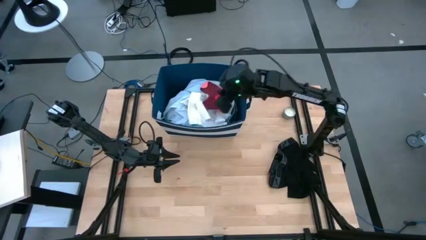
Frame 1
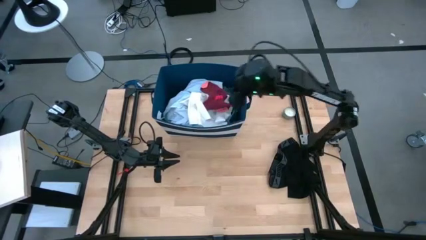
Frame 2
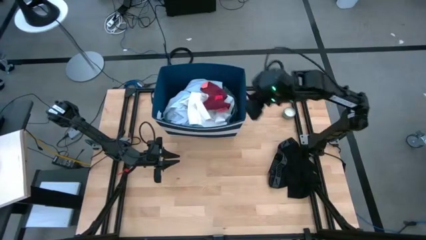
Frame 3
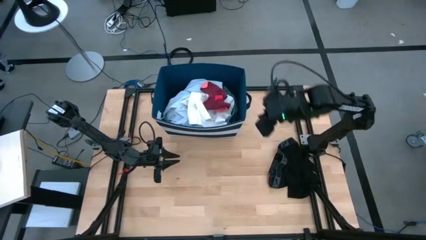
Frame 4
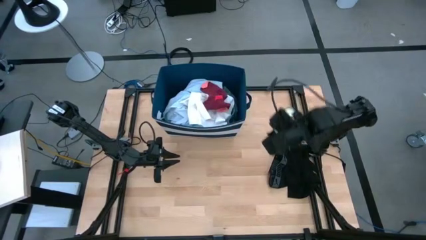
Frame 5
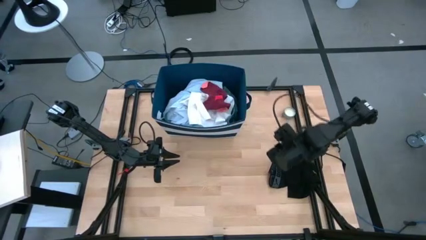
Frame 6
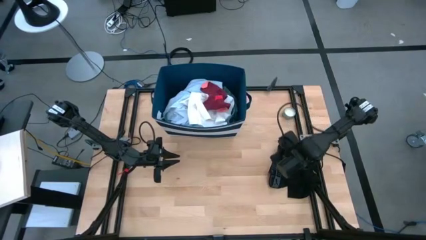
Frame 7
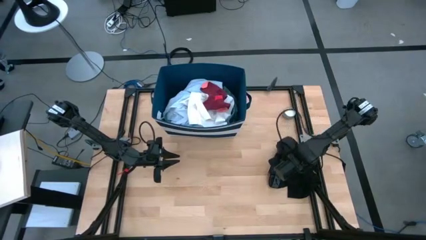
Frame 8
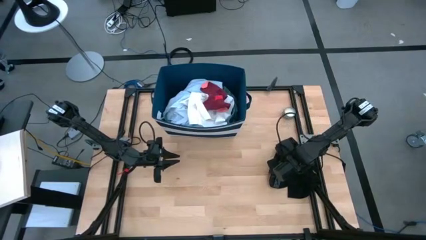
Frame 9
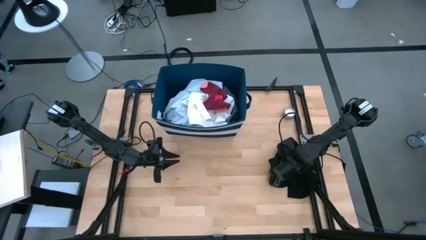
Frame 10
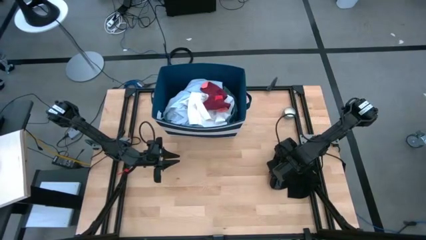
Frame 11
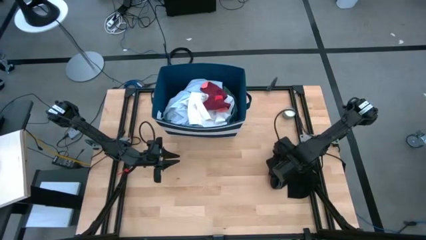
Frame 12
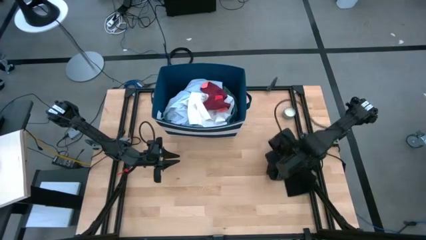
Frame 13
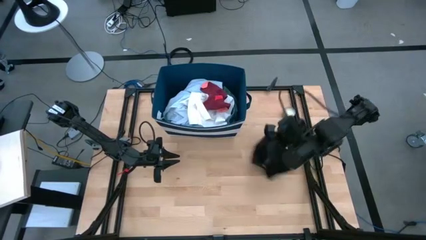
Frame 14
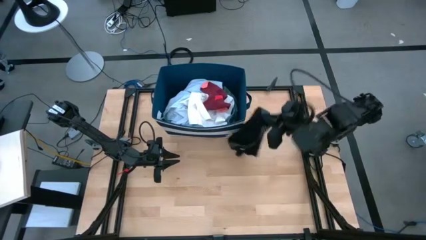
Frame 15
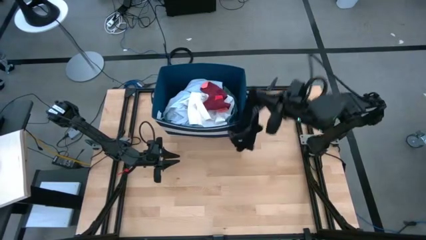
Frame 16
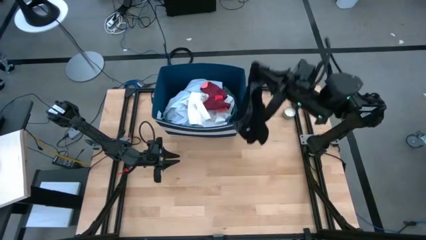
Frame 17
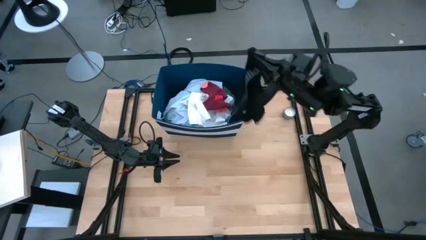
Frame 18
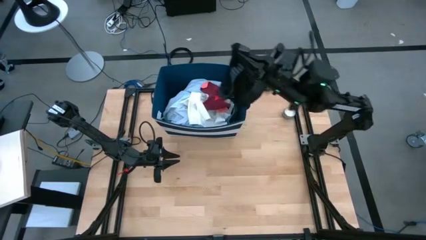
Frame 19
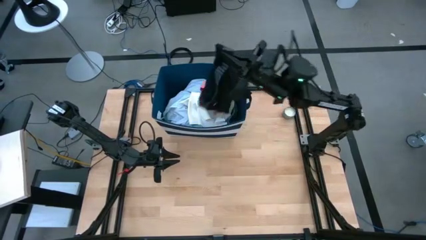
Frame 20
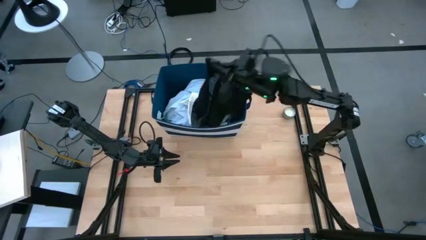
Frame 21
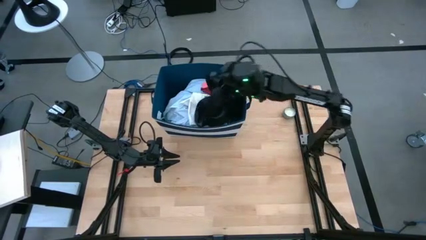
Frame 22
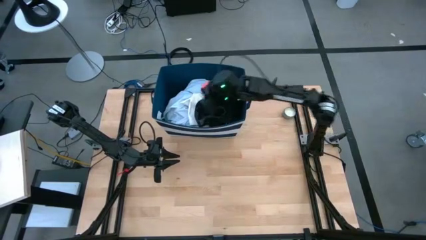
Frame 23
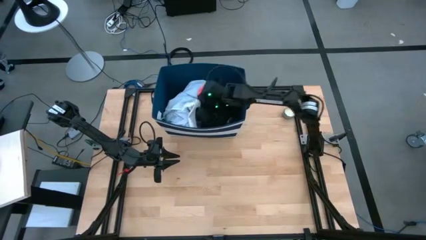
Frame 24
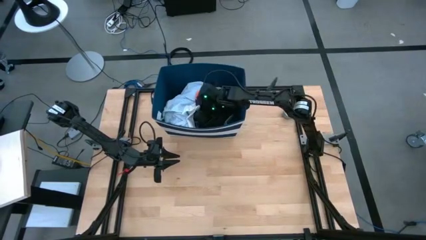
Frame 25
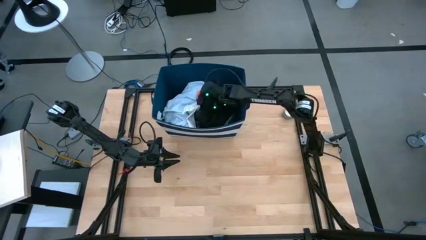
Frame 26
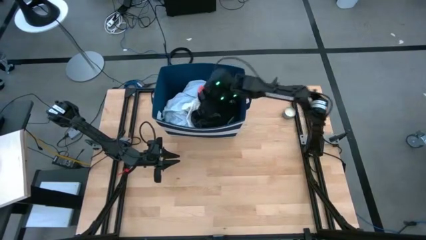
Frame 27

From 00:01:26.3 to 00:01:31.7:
Task: Sort clothes
Put the black underwear into the bin

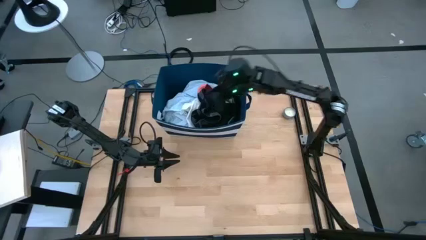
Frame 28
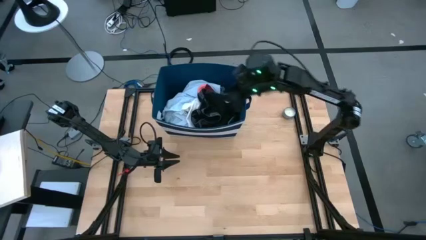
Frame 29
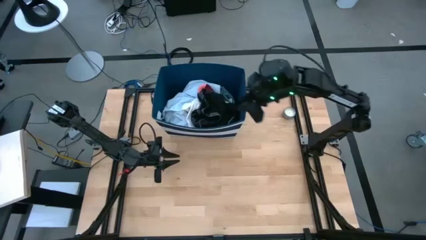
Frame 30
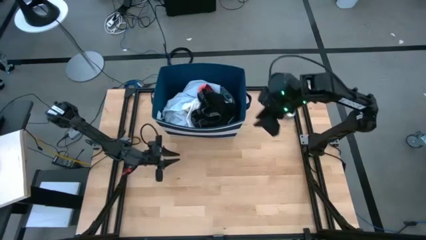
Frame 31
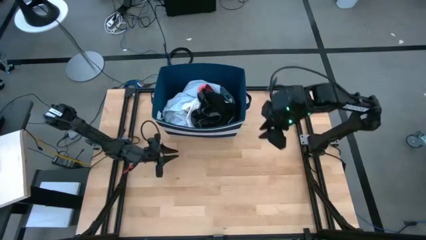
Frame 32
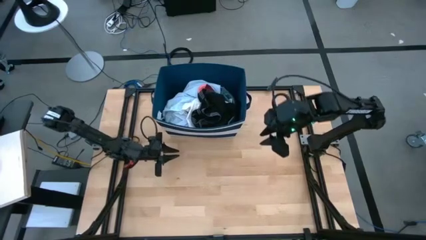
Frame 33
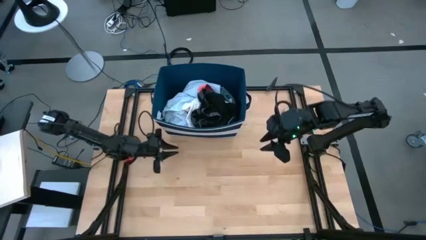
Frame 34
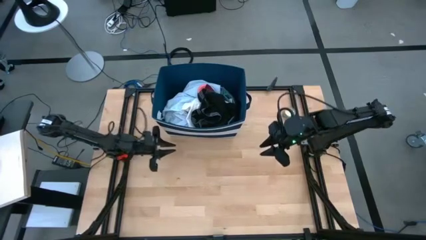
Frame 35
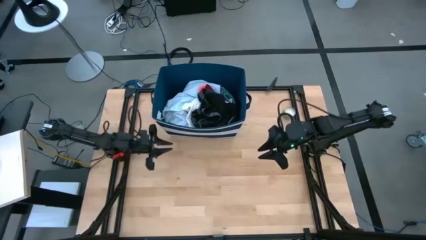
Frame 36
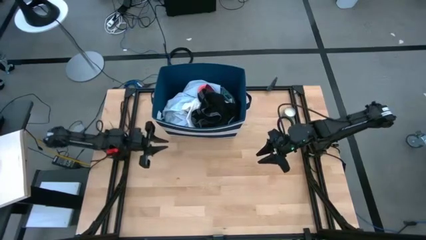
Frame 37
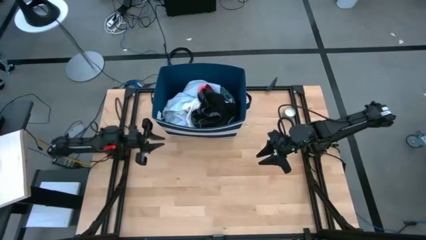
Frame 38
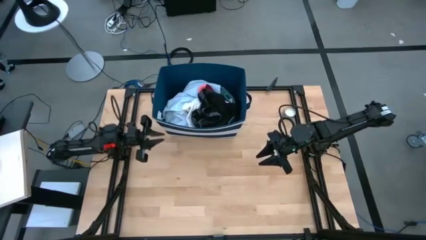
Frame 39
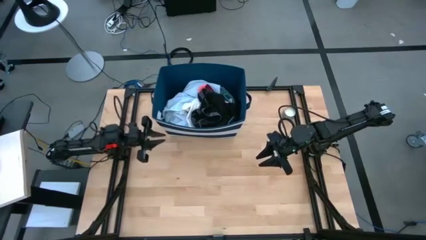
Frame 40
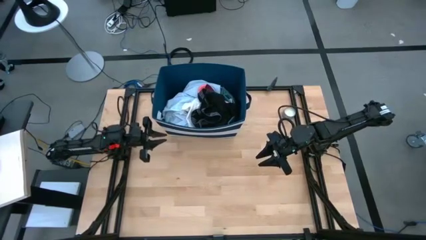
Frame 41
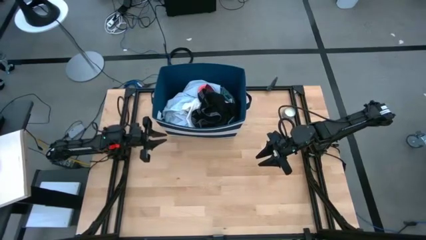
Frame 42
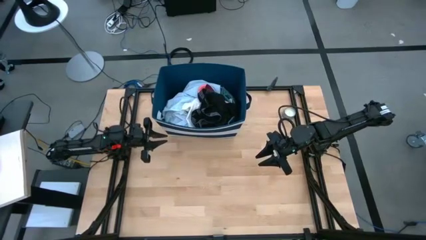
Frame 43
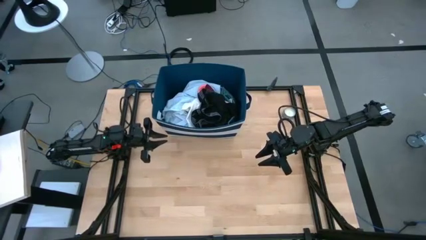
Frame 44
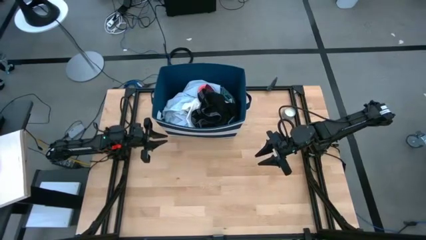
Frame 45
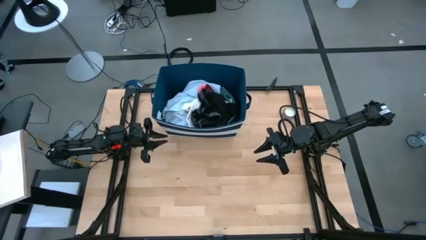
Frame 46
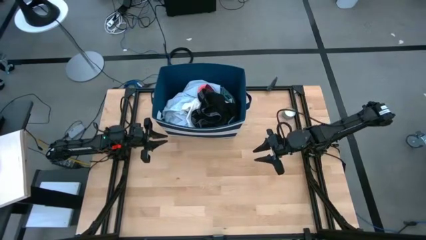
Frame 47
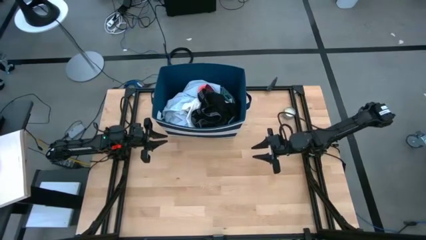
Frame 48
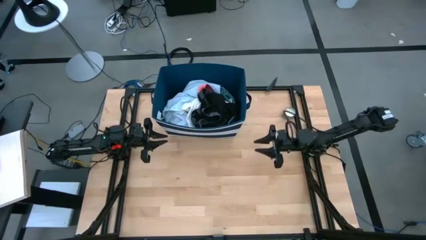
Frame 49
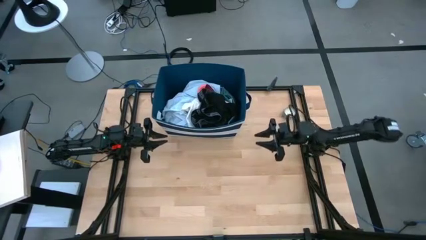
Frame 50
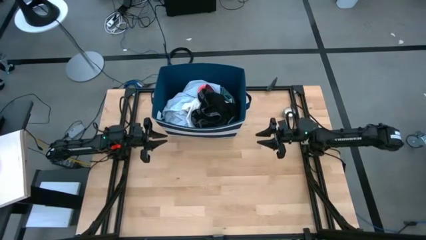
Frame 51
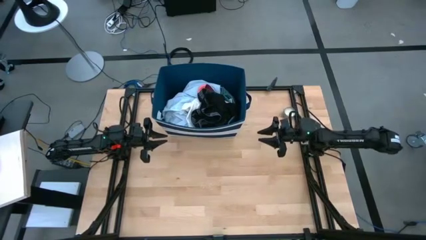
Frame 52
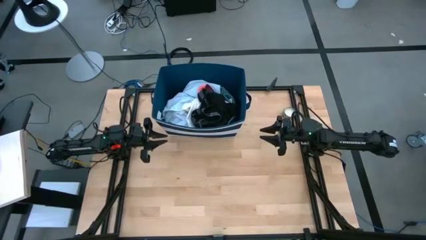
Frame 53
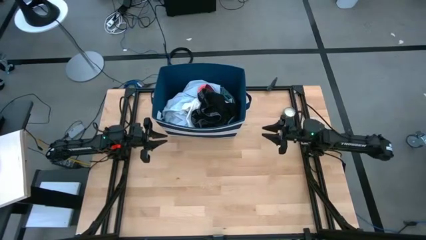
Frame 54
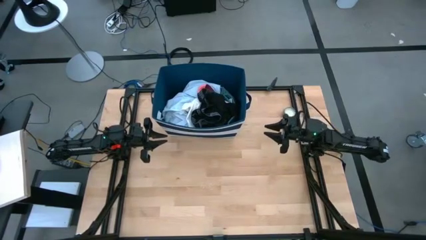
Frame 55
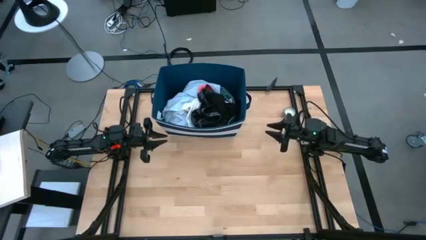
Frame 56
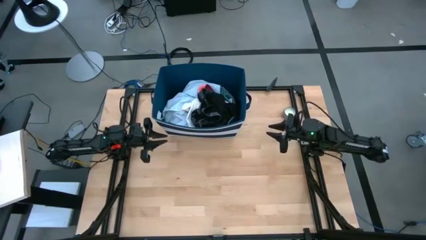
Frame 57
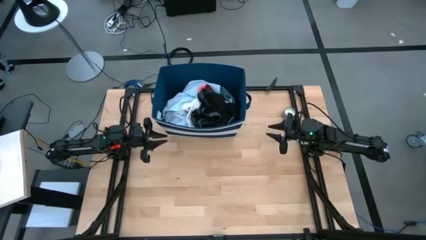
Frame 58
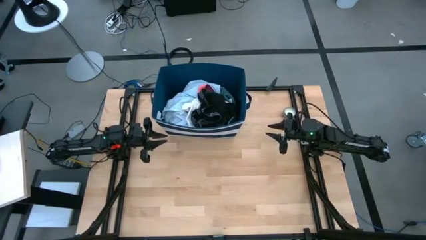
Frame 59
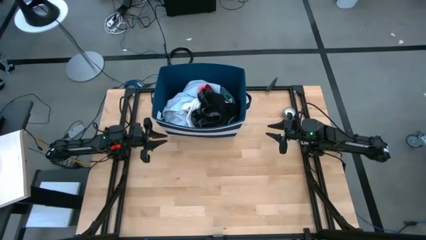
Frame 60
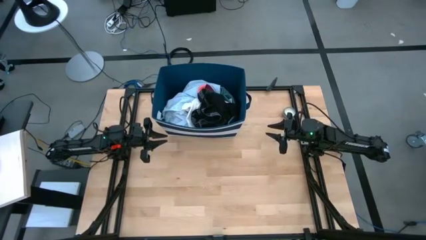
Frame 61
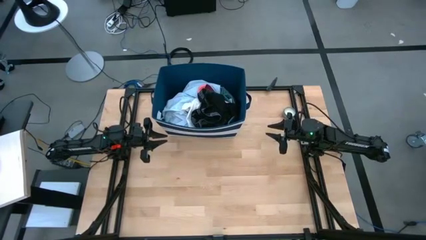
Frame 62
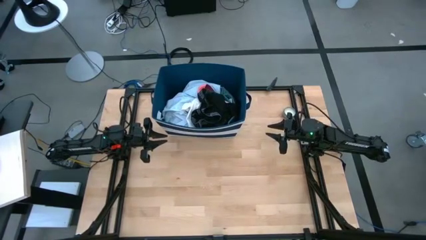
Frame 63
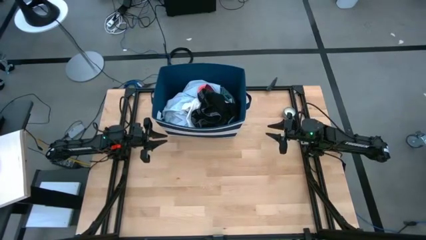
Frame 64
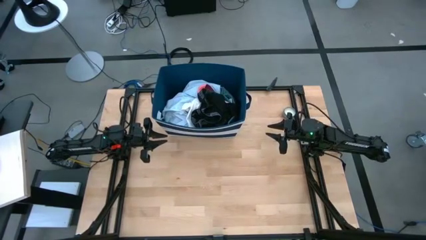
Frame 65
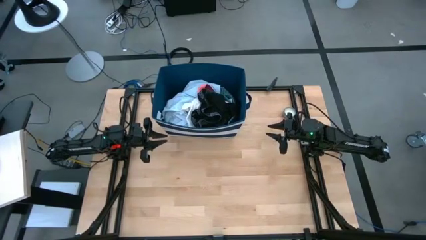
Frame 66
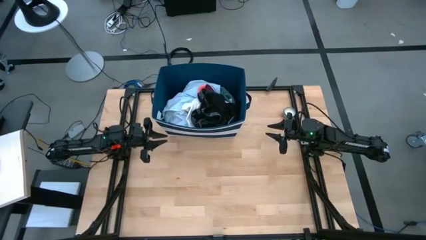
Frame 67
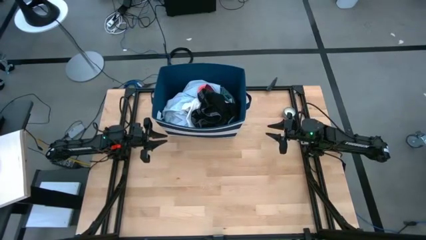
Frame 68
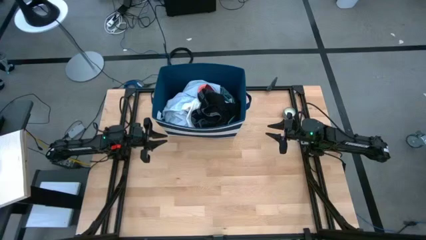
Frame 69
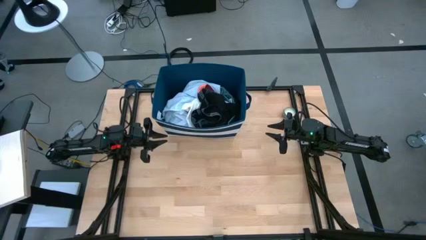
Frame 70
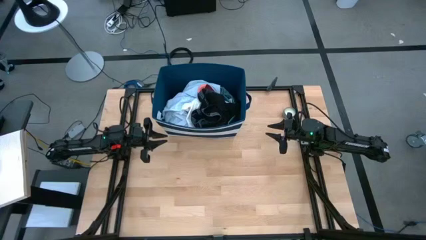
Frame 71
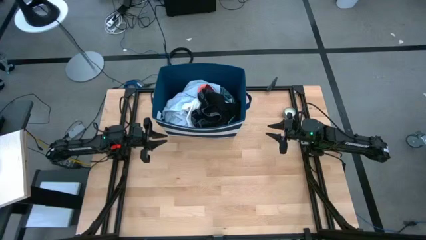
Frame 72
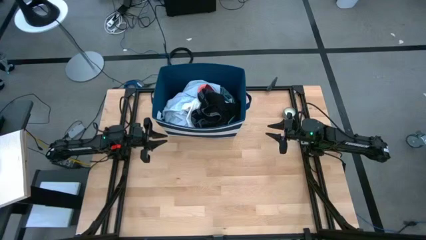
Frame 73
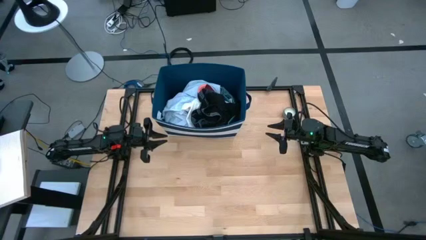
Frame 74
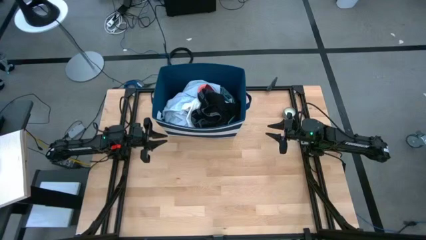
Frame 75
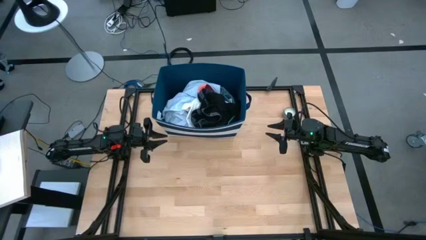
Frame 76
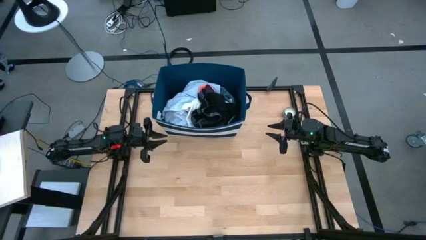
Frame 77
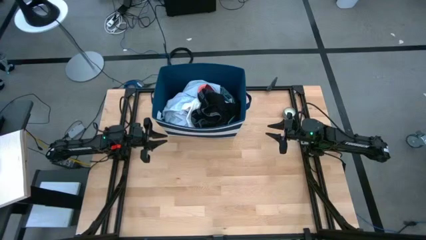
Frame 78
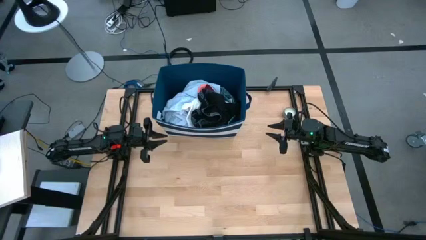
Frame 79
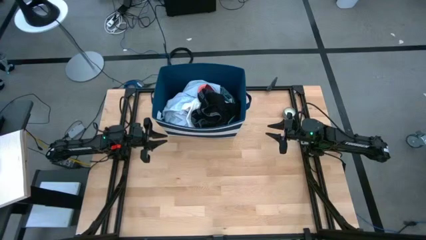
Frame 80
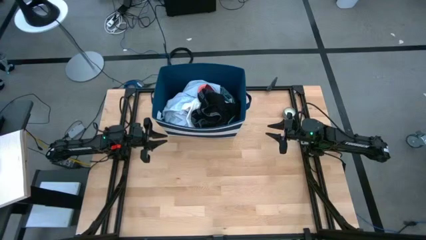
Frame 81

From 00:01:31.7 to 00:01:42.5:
Return to Home Position
